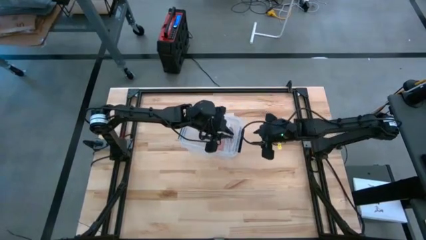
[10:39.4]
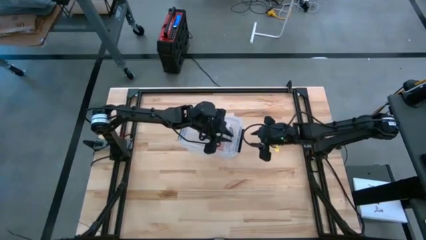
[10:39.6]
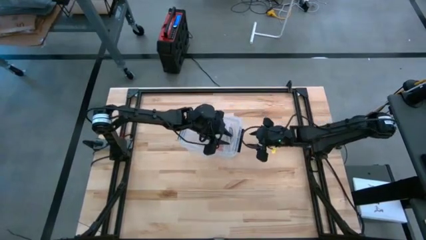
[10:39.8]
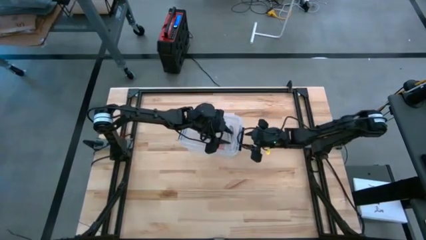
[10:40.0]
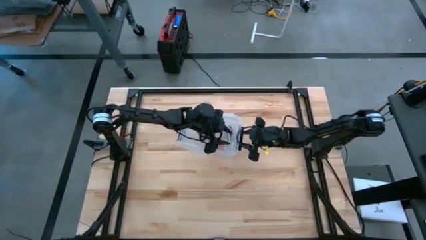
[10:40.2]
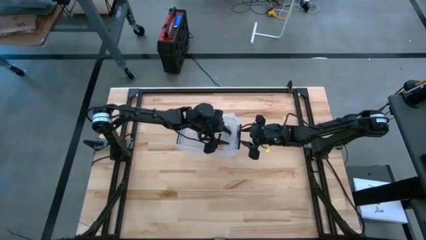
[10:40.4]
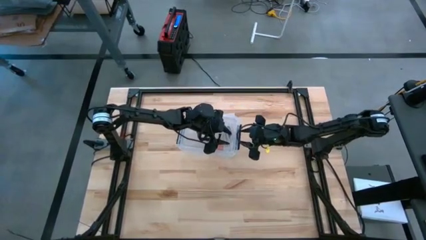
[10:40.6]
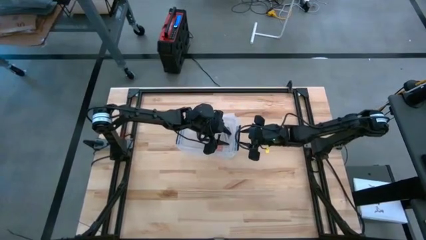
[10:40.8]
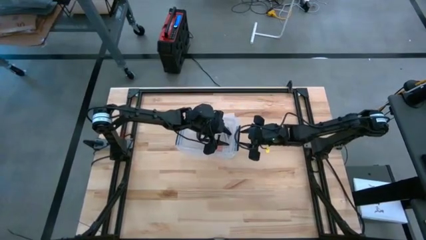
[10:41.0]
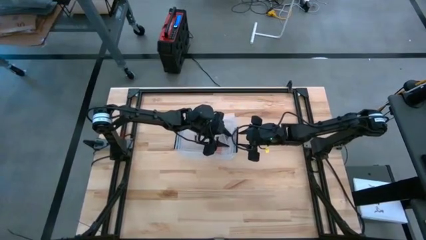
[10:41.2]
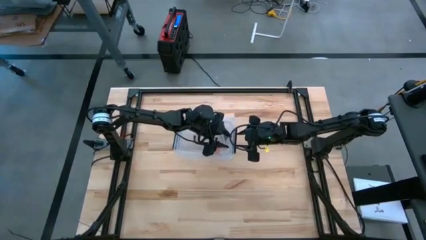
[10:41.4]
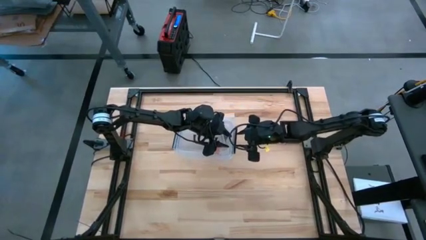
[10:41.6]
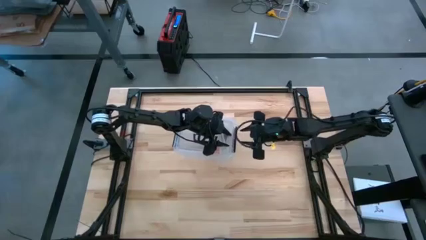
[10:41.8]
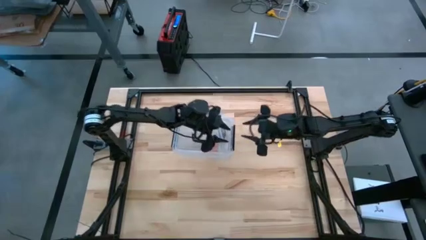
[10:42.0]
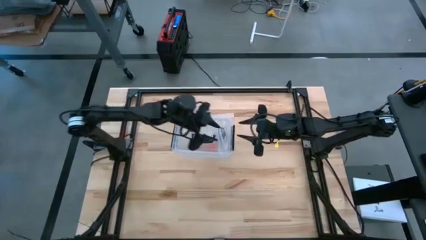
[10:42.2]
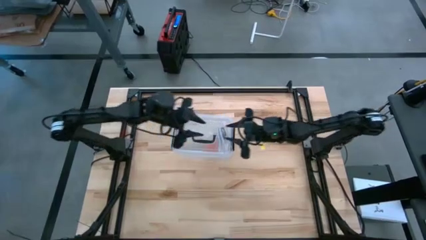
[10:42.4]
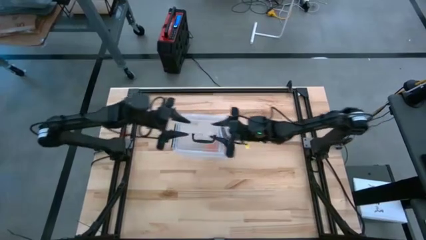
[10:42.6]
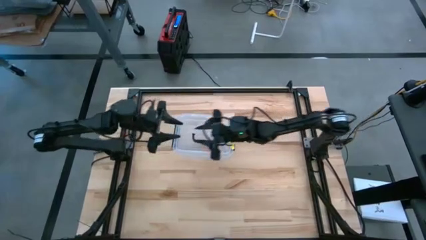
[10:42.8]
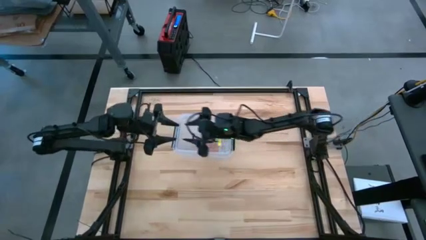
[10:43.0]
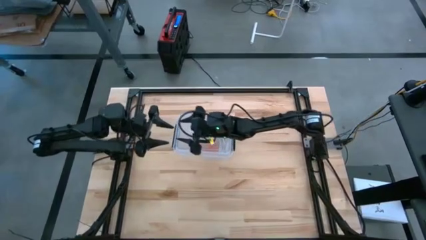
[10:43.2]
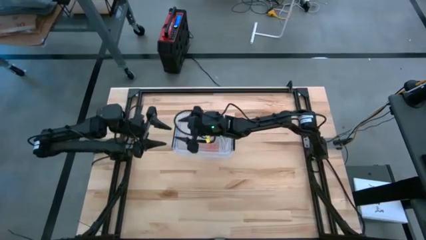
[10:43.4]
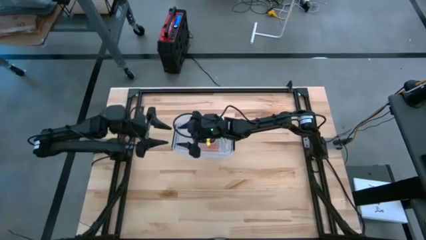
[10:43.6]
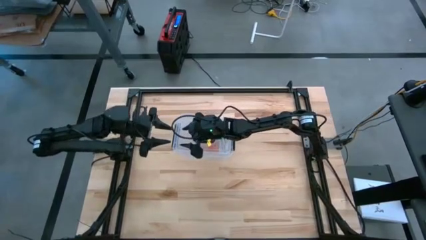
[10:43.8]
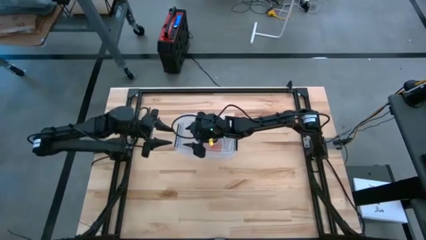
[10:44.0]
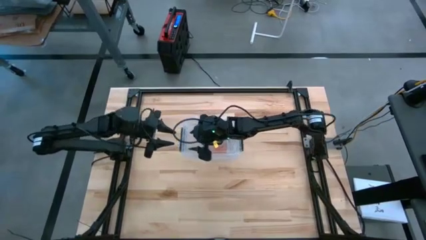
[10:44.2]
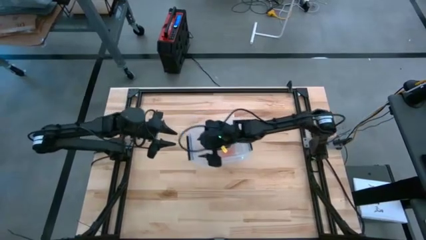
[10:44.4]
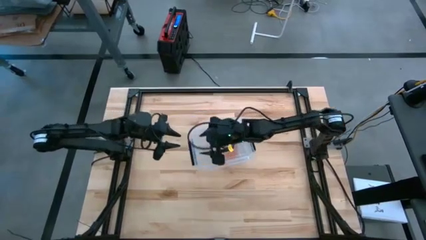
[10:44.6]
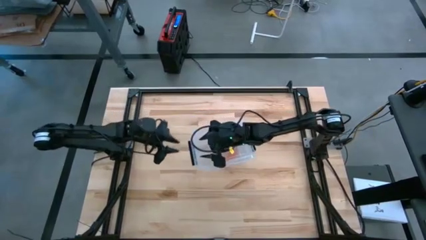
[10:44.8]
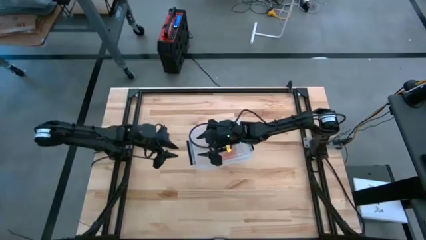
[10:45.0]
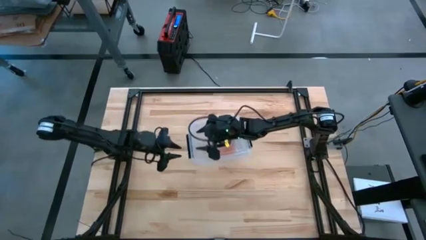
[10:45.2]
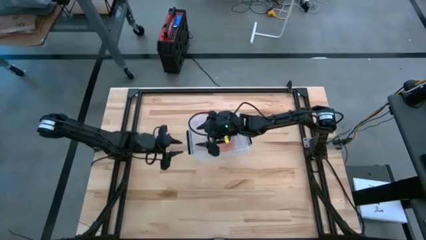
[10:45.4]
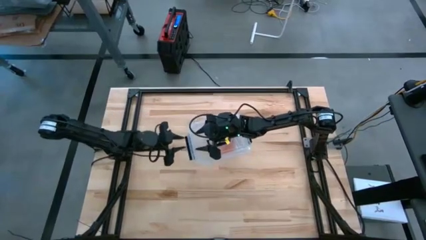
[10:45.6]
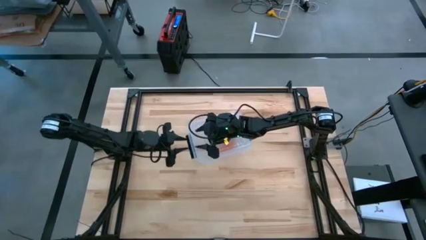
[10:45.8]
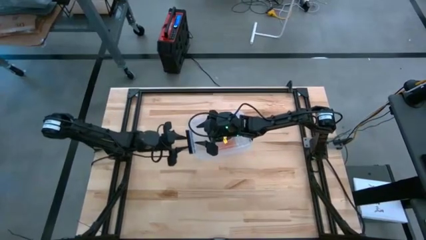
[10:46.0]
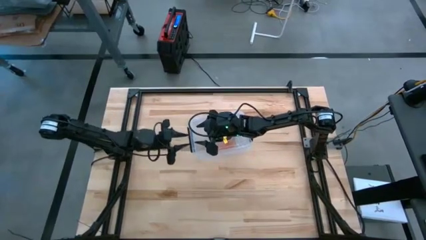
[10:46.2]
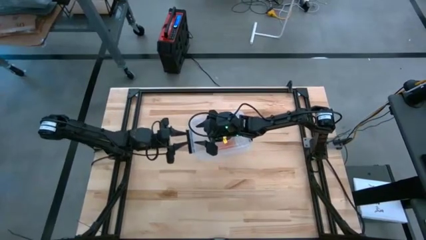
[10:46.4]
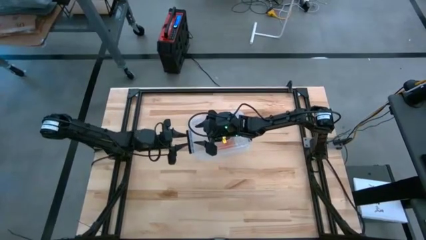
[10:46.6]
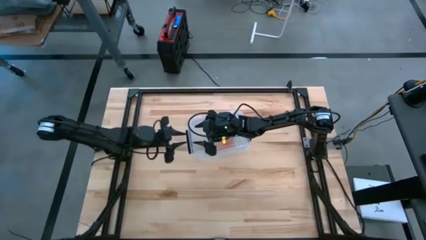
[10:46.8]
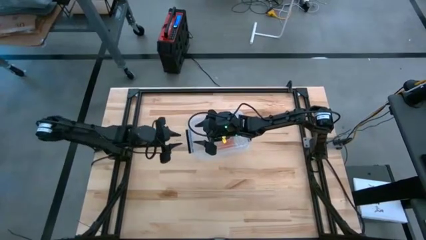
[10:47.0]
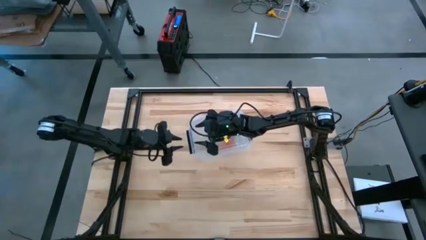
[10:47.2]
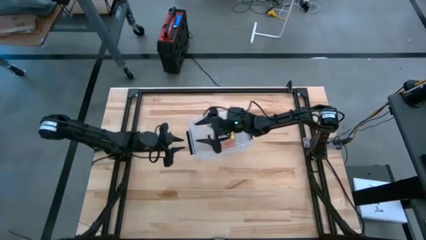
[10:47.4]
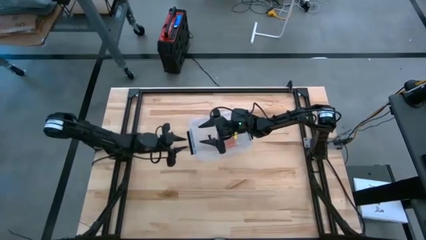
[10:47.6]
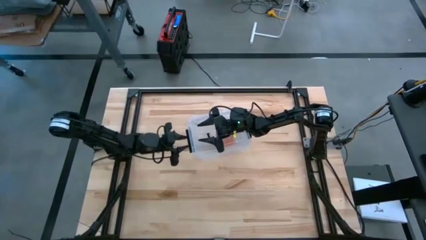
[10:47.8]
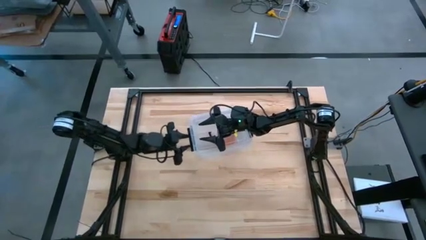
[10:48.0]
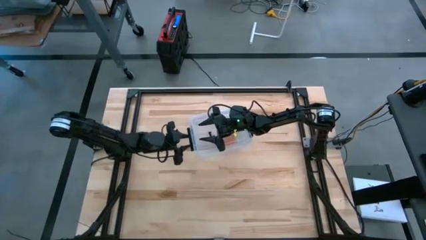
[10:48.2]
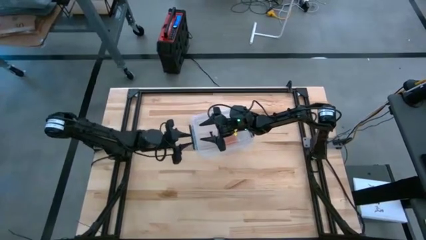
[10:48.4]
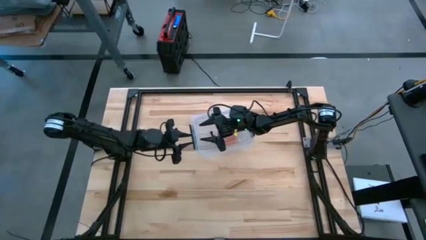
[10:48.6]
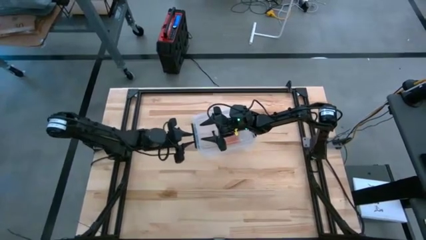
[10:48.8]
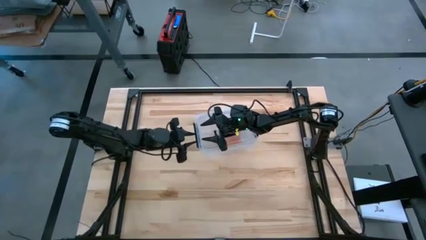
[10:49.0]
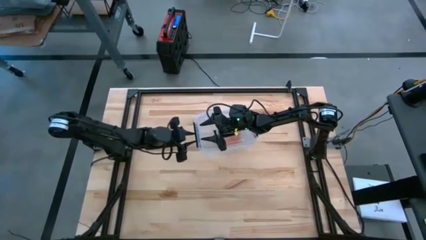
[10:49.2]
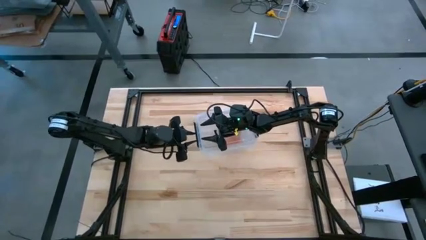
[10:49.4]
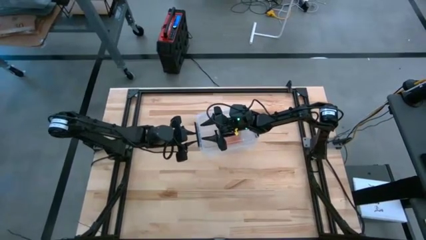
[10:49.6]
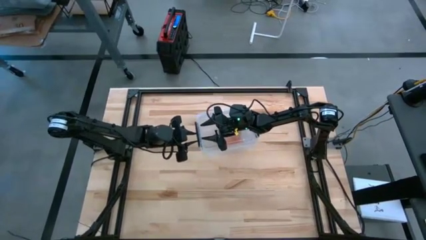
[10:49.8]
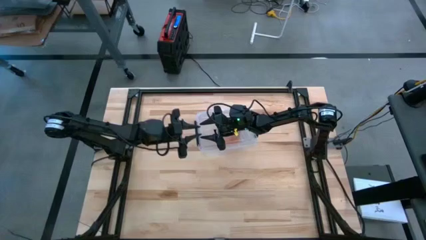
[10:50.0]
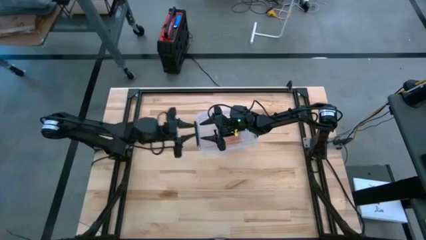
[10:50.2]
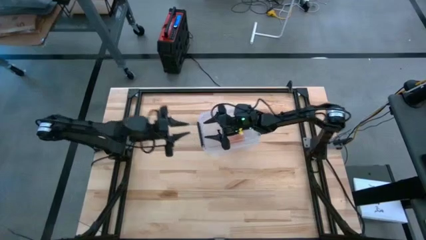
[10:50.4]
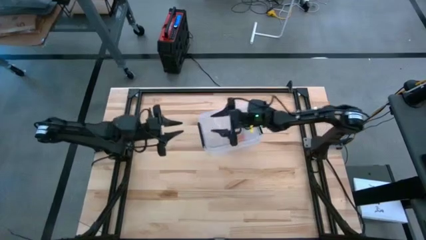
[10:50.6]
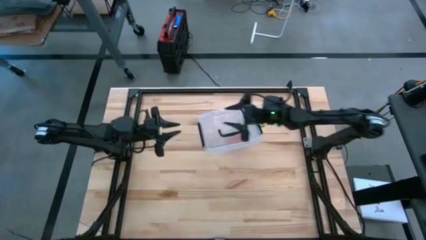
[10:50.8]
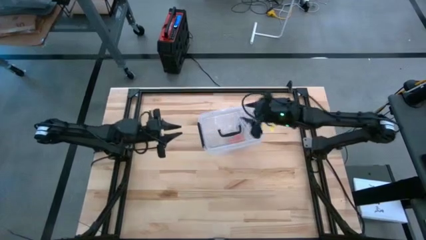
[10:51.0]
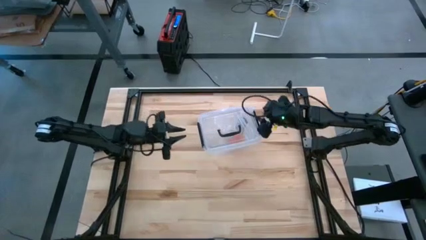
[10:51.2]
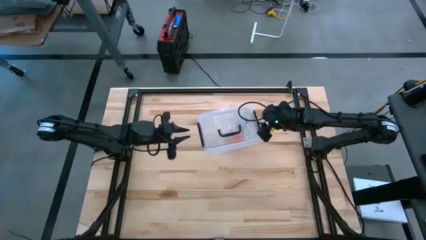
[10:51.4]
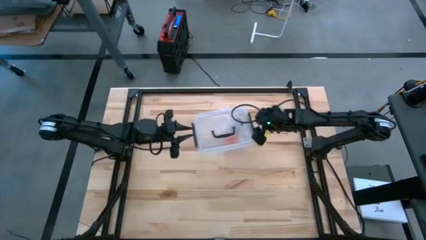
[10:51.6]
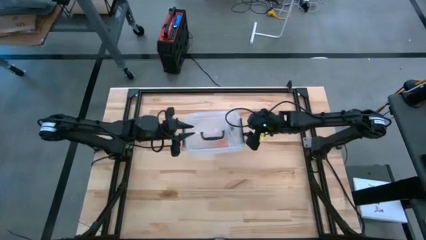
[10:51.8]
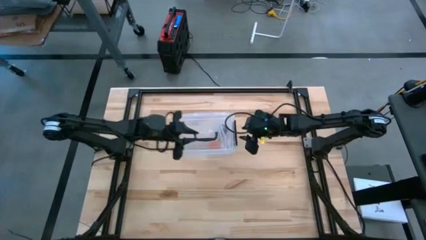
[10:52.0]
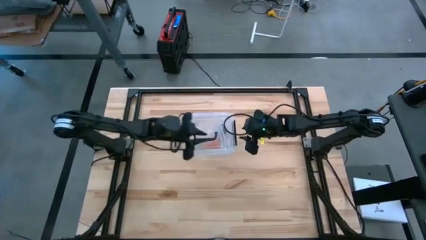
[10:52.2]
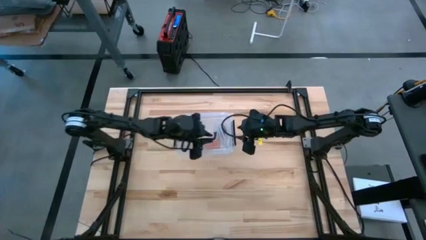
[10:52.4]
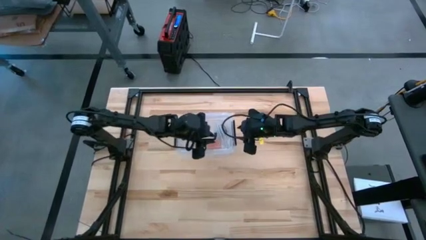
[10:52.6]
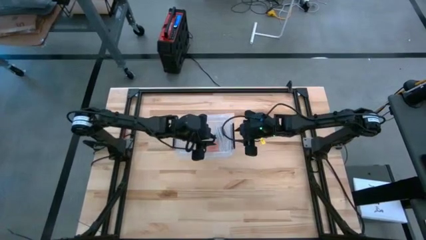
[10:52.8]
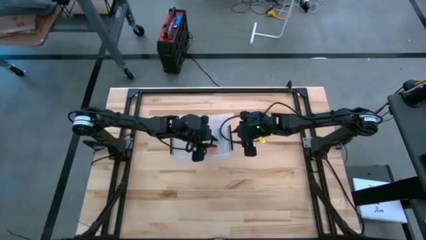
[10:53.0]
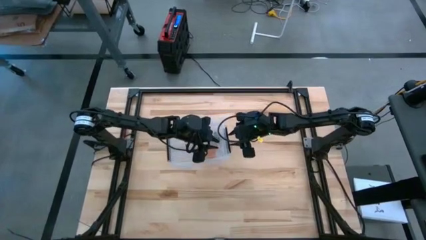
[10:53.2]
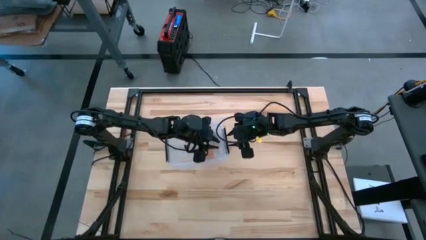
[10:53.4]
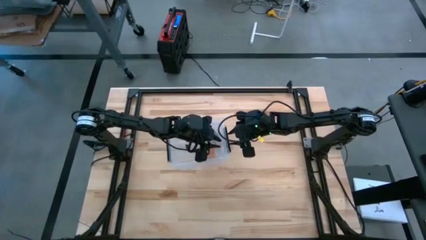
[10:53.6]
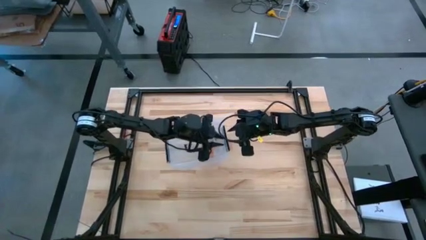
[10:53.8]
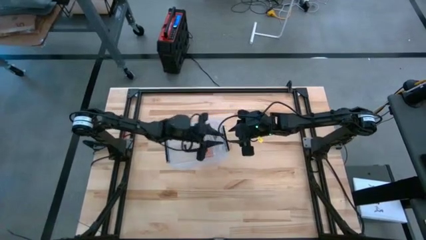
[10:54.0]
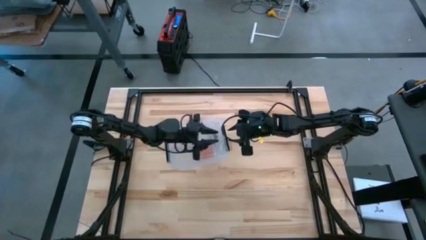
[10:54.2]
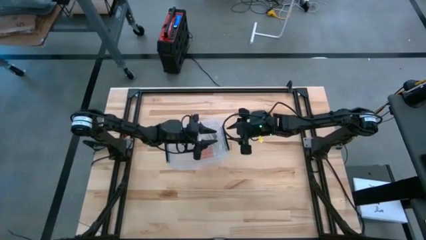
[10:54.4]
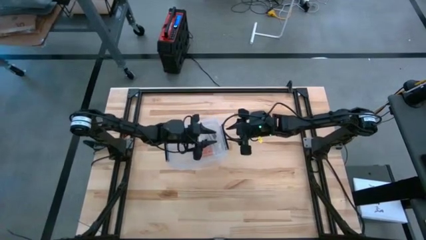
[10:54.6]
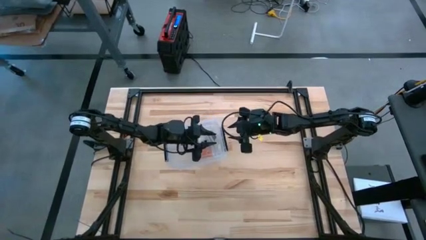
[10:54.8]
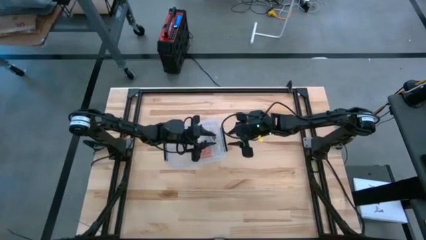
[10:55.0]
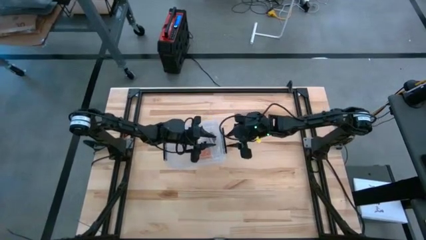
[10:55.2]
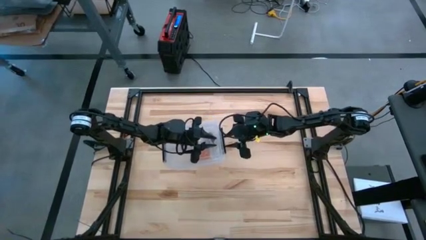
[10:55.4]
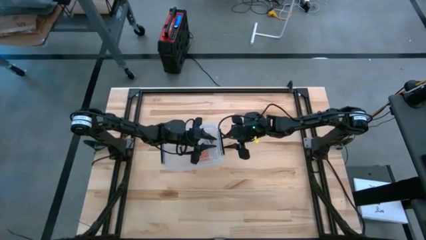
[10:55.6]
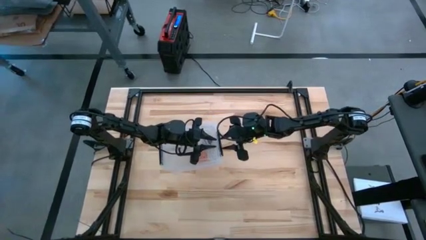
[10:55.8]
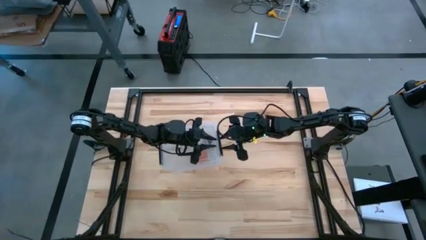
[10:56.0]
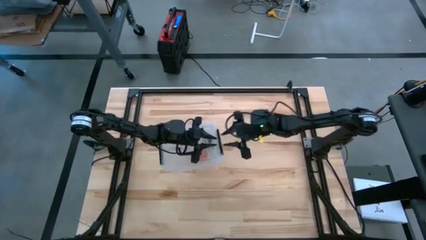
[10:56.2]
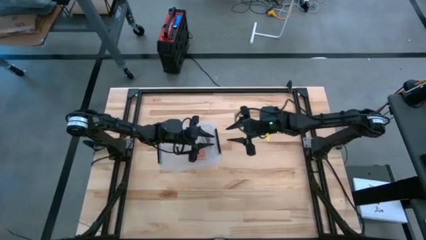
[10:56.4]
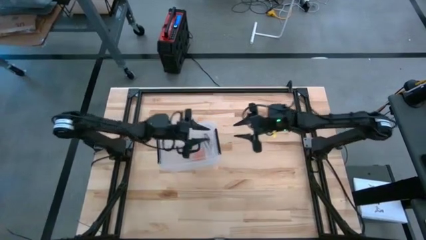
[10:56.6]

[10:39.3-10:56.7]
Task: Roll bandage
Close the transparent bin
